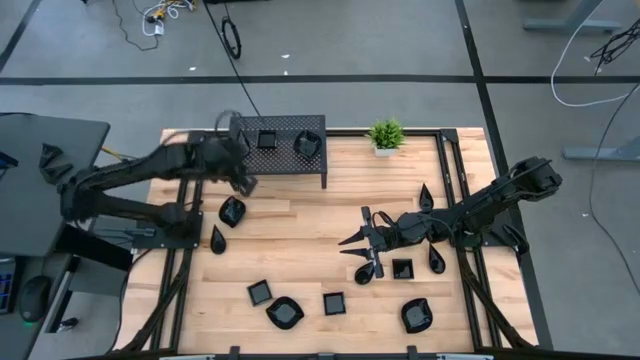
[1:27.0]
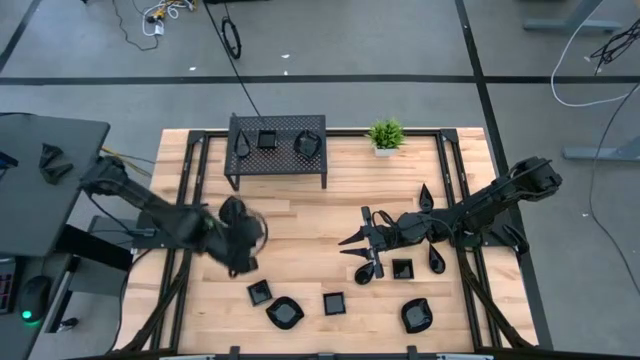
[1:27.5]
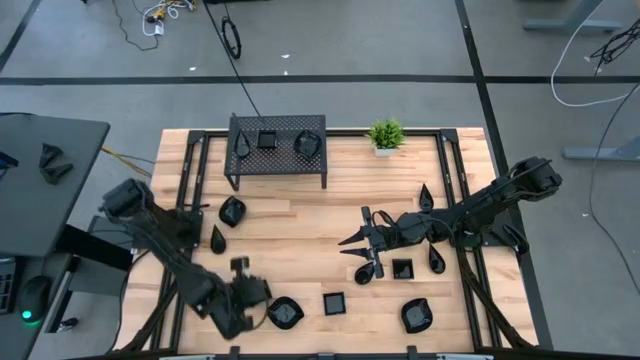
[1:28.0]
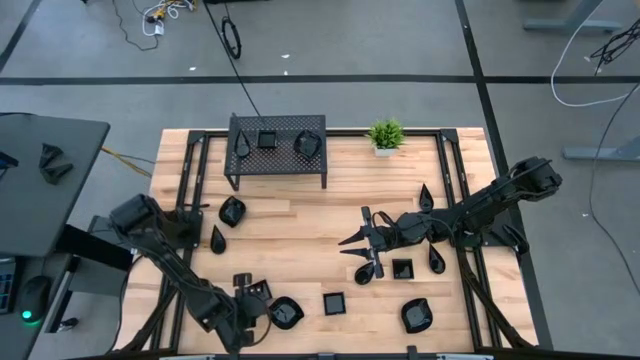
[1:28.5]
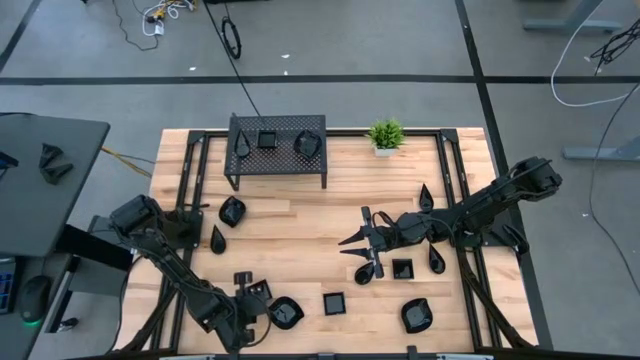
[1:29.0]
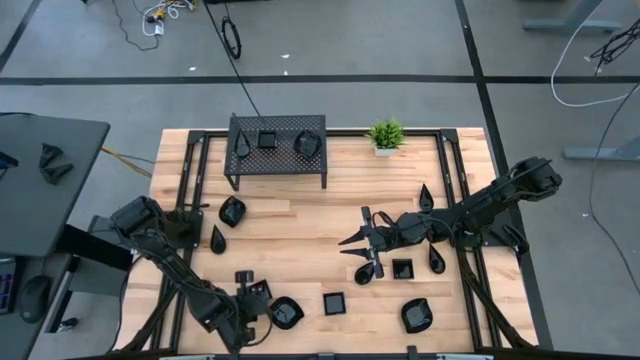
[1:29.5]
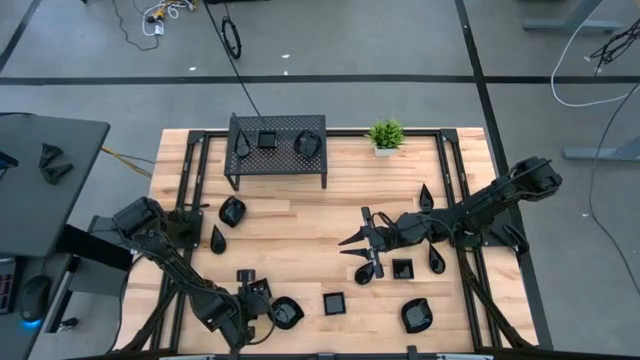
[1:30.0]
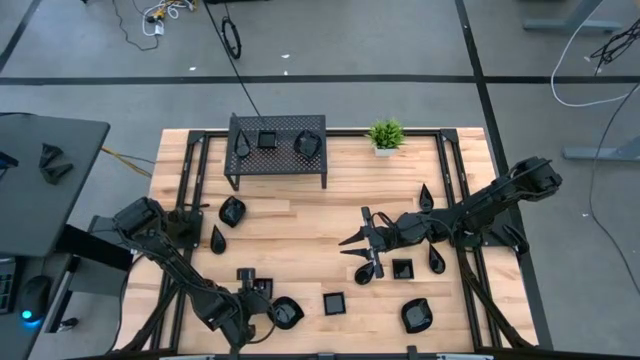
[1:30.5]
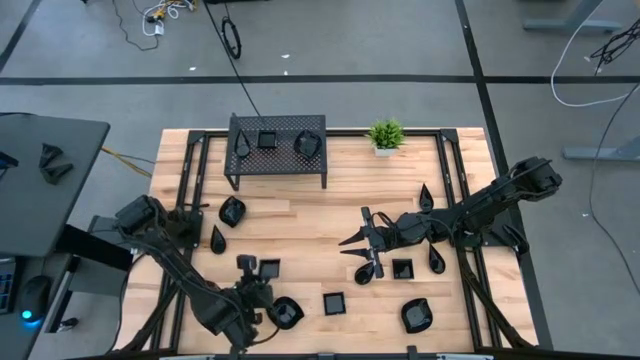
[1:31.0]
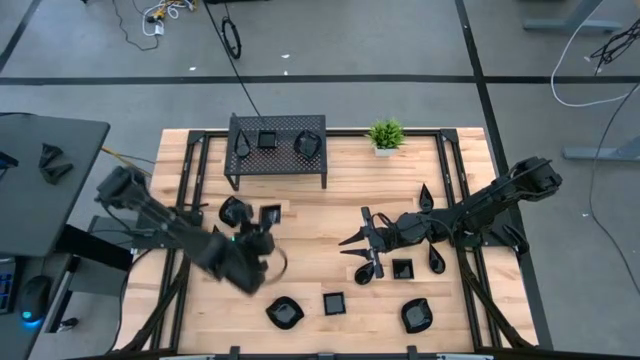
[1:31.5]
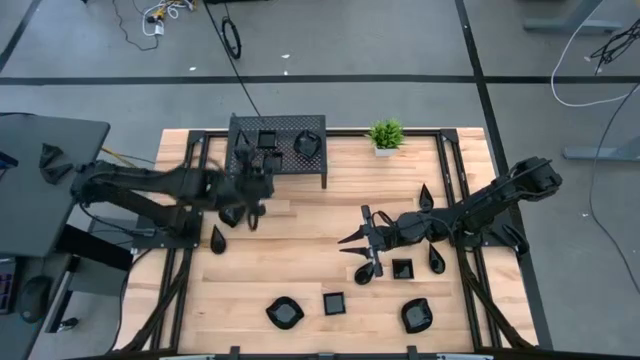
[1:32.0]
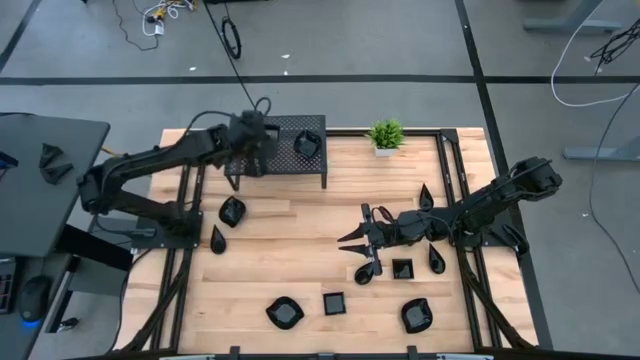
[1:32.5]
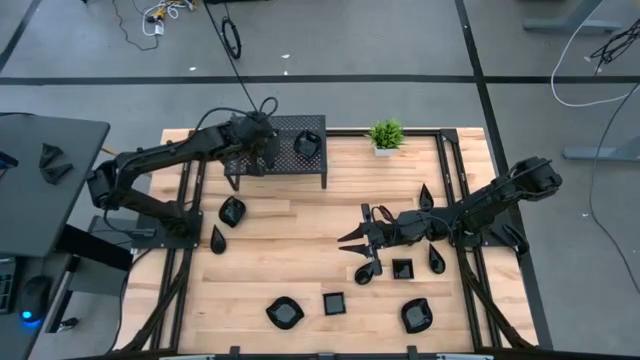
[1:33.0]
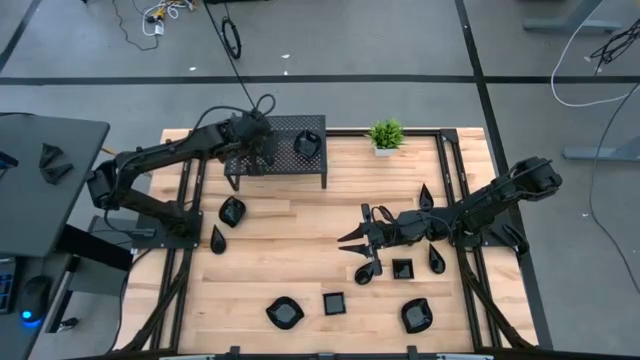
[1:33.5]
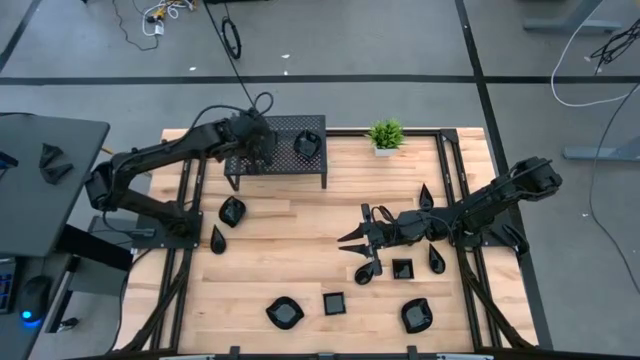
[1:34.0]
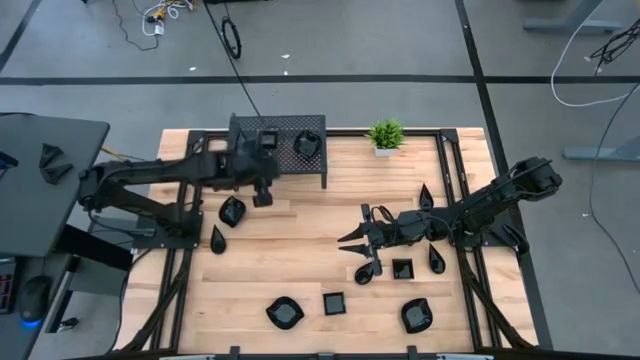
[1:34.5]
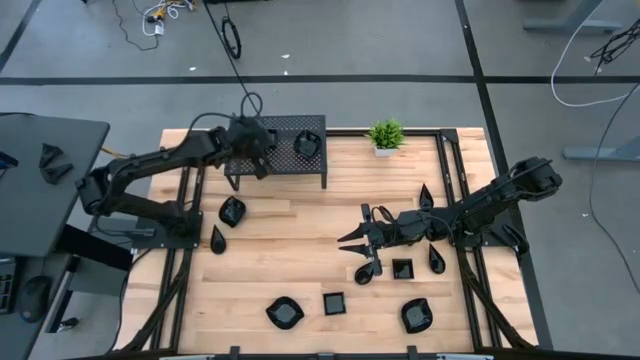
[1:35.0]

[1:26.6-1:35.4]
Task: Pick & Place Mini shaped plates
Stack the black square plate on top of the black square plates on the shelf

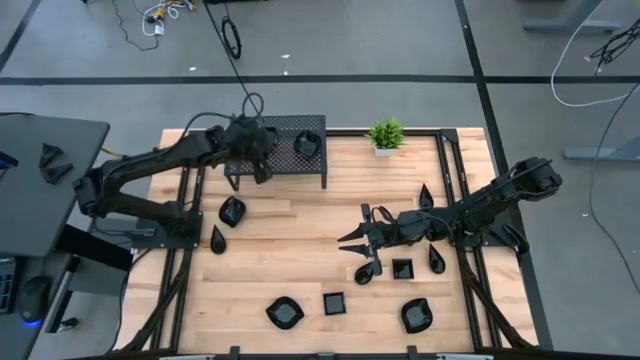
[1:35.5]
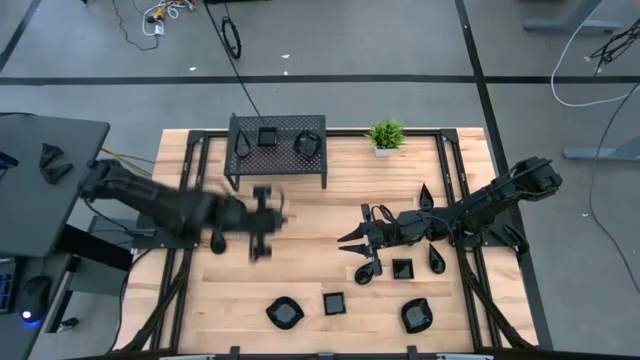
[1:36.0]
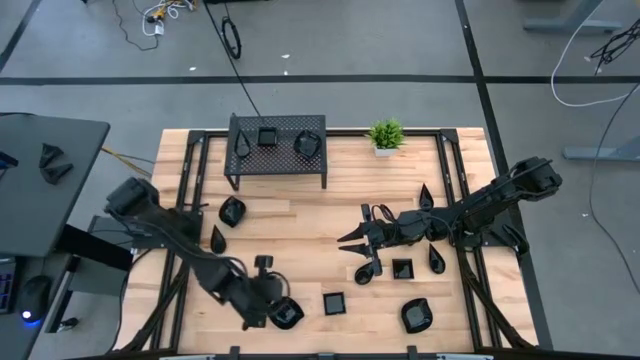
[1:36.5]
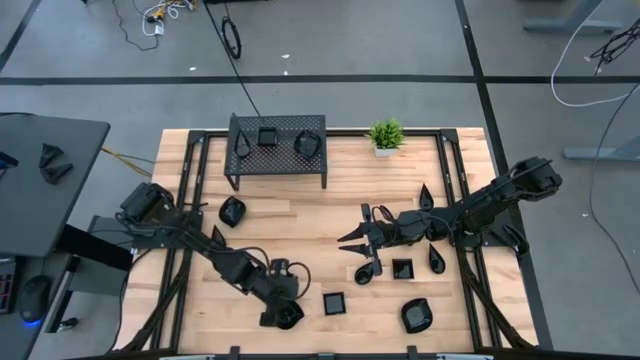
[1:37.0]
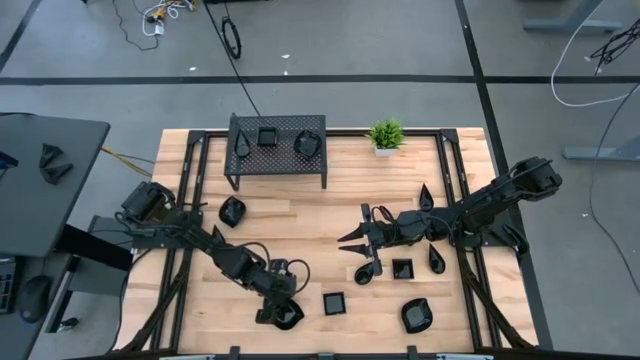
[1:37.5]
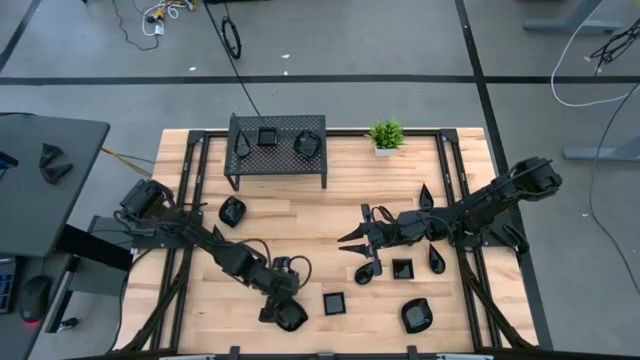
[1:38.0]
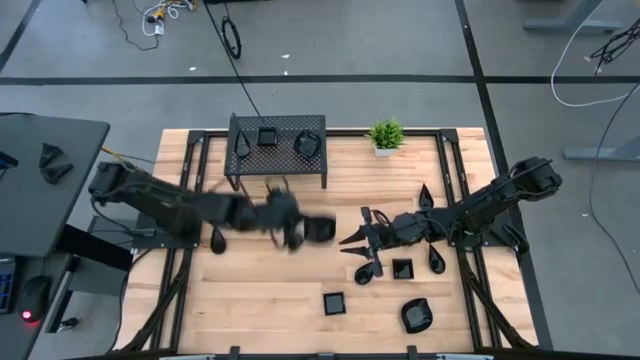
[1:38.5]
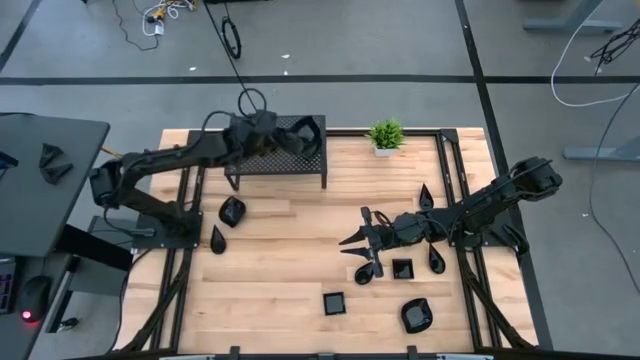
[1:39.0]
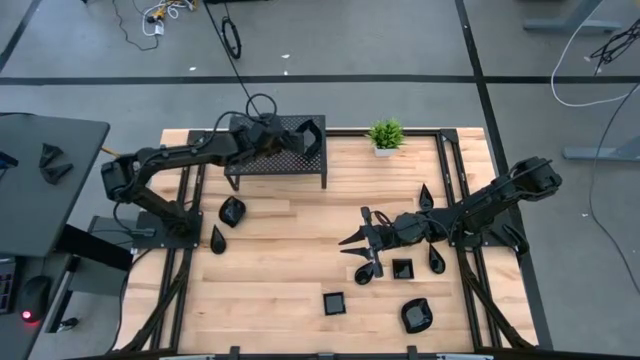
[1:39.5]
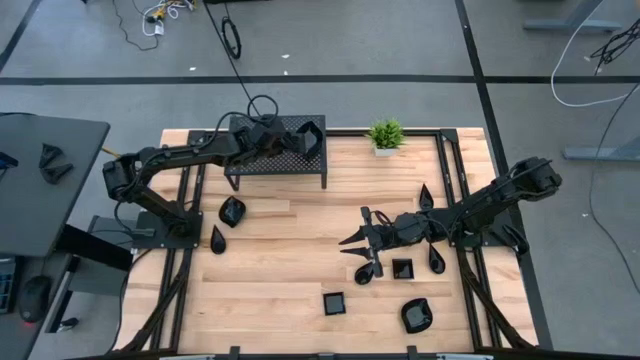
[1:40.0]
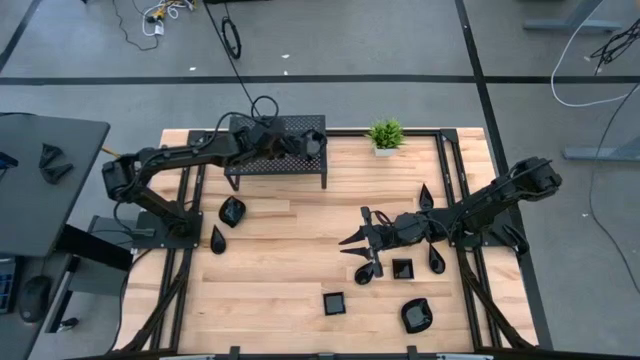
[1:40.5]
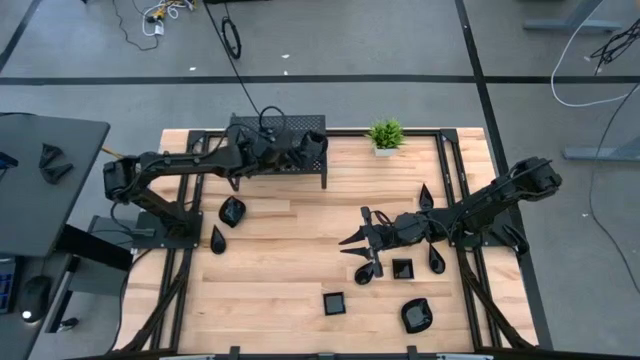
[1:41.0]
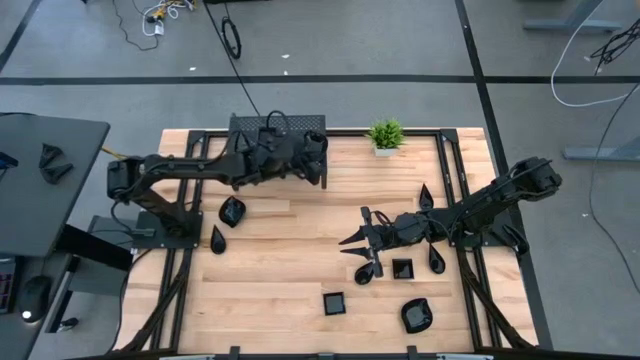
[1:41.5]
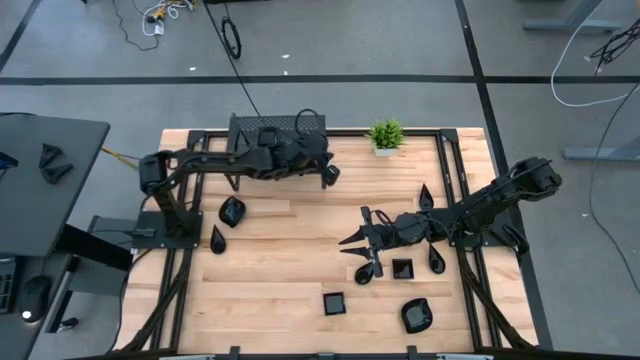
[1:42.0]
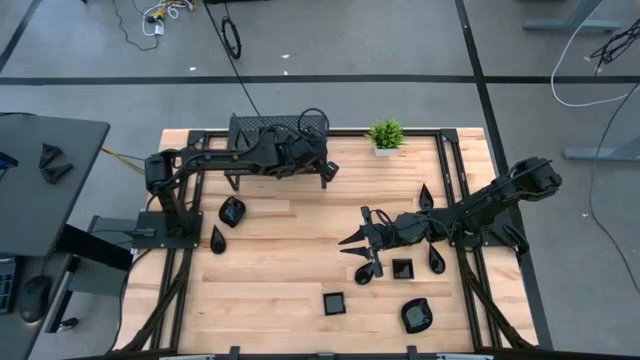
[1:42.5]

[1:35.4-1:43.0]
Stack the black leaf shaped plate on top of the black leaf shaped plates on the shelf

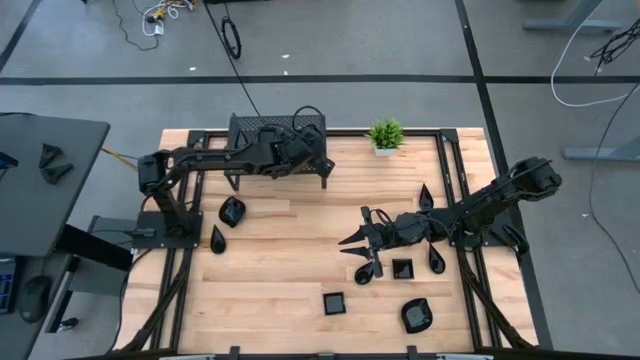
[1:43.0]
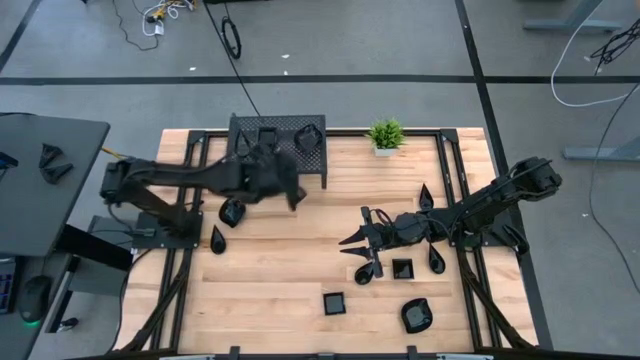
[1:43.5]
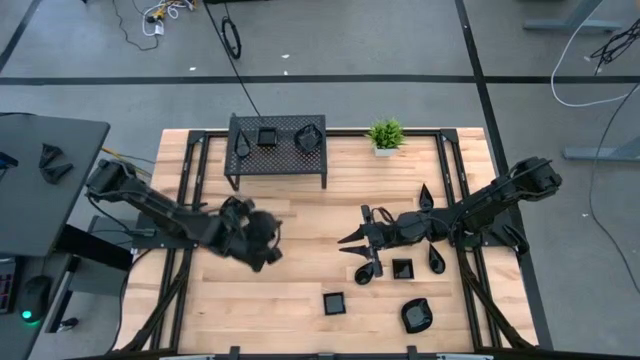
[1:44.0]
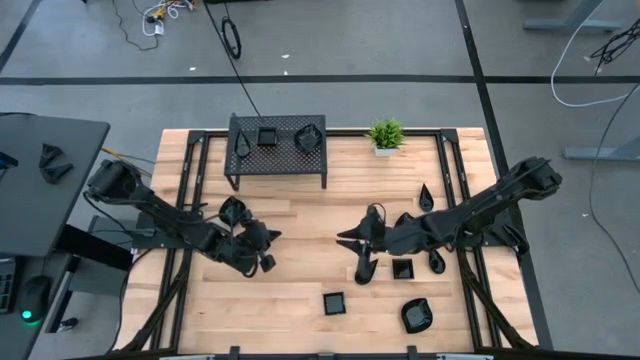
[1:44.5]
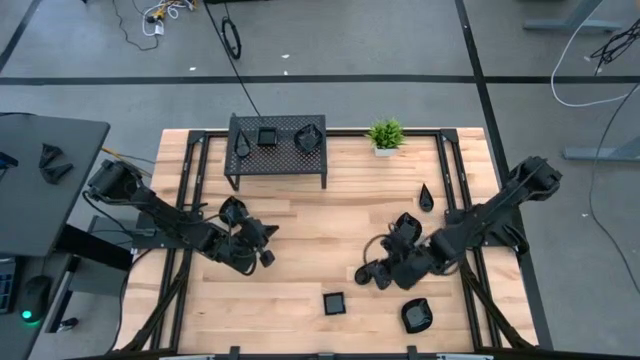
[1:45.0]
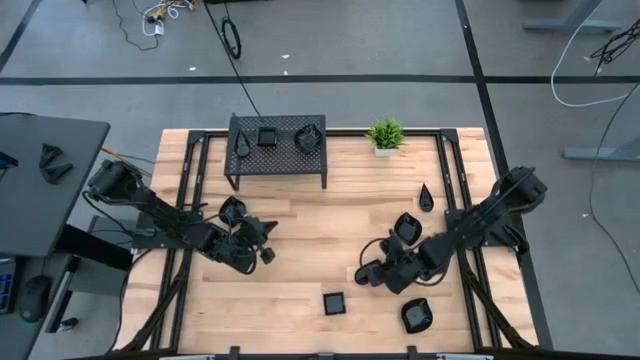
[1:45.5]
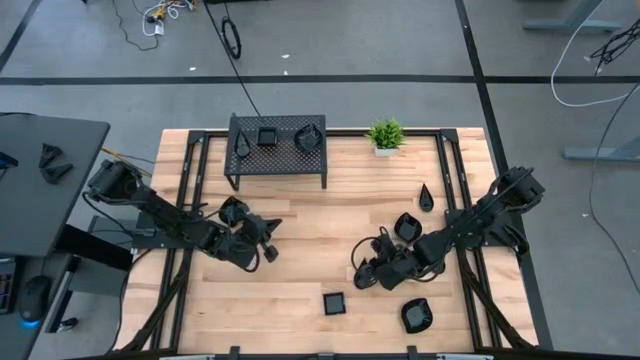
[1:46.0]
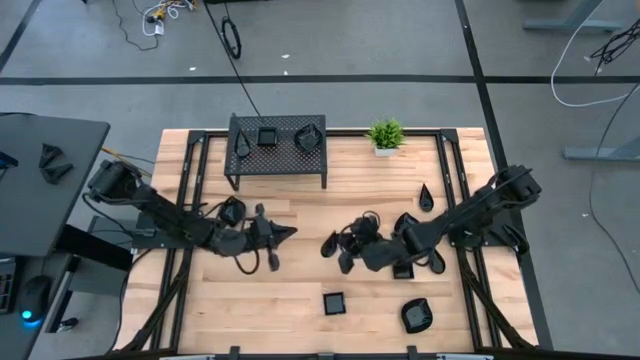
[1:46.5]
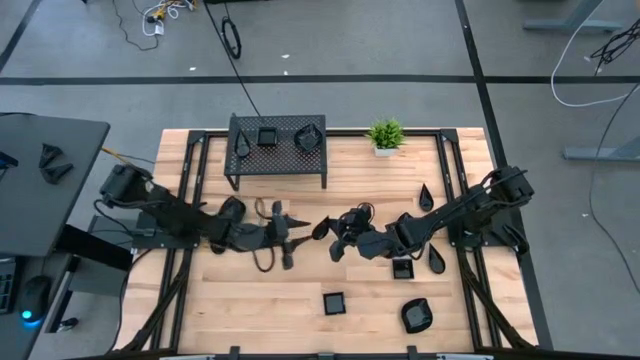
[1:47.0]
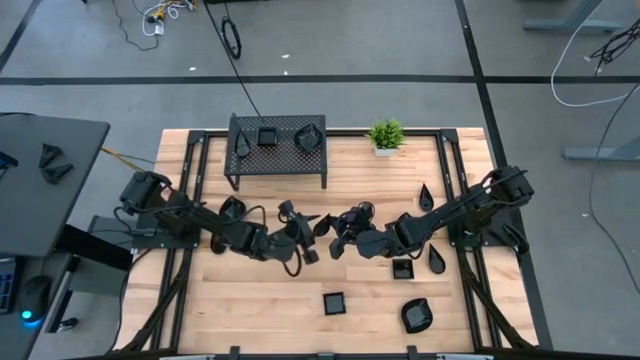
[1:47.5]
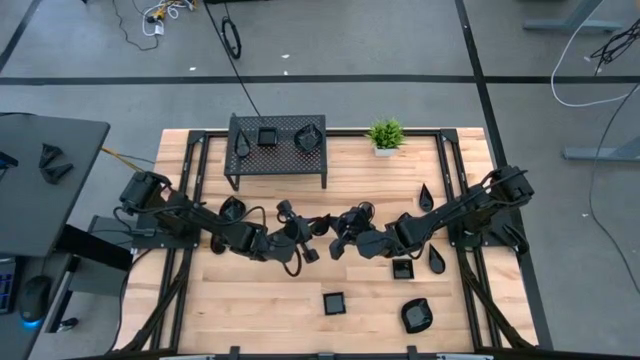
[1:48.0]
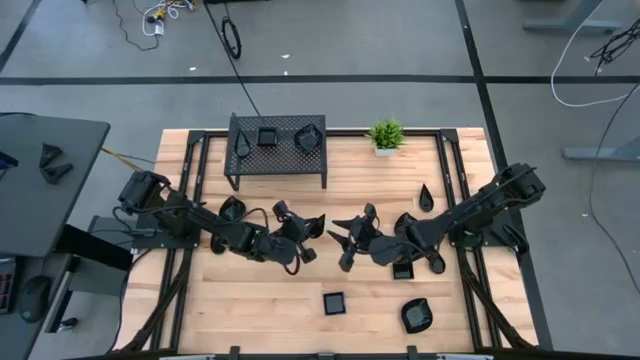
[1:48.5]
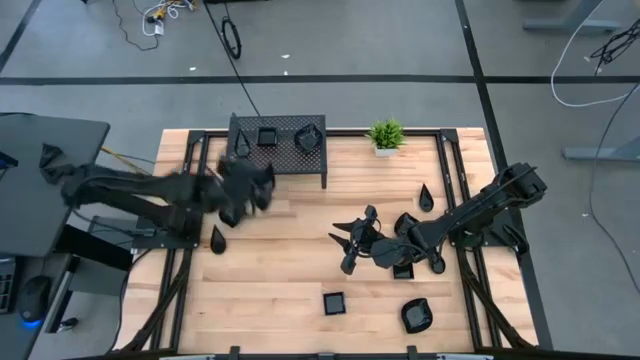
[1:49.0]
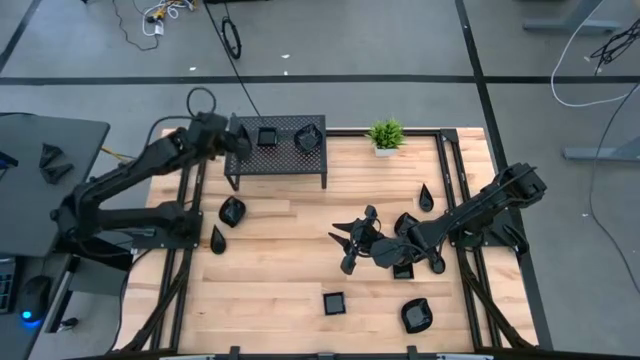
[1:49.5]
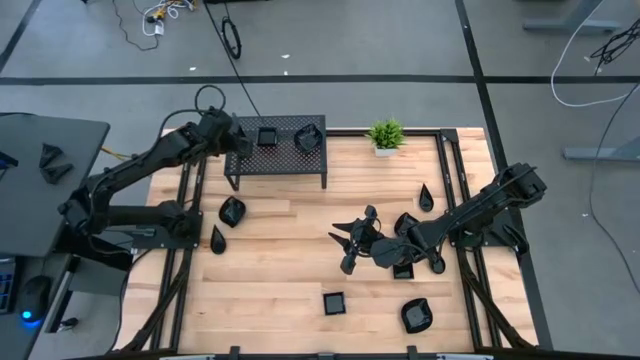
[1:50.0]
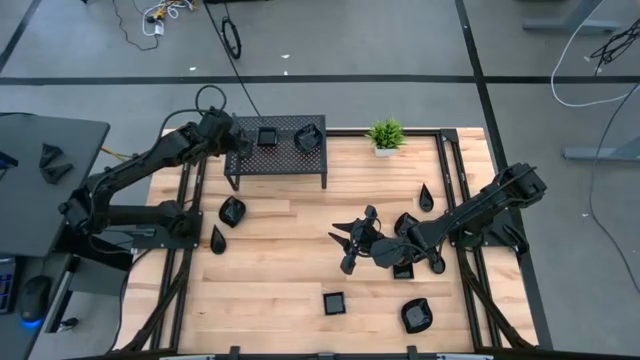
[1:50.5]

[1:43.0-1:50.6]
Stack the black drop shaped plate on top of the black drop shaped plates on the shelf
